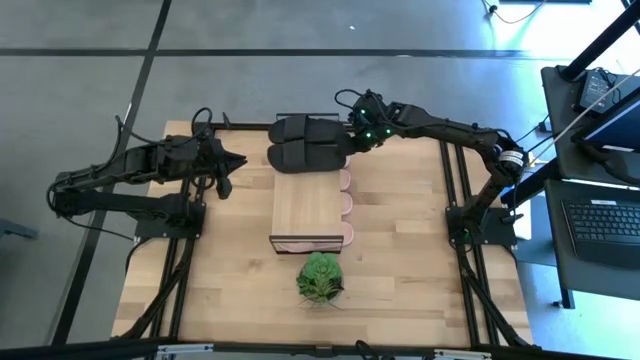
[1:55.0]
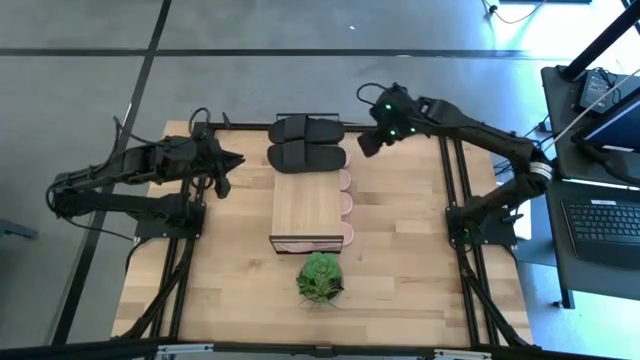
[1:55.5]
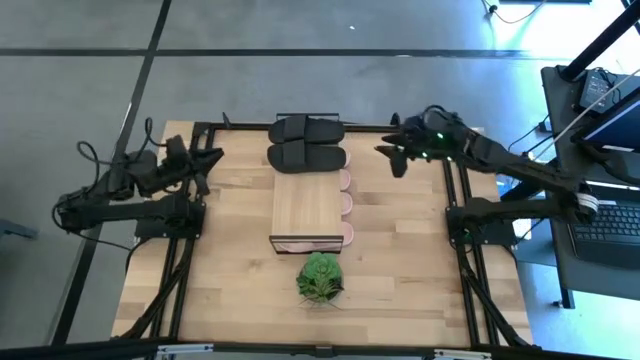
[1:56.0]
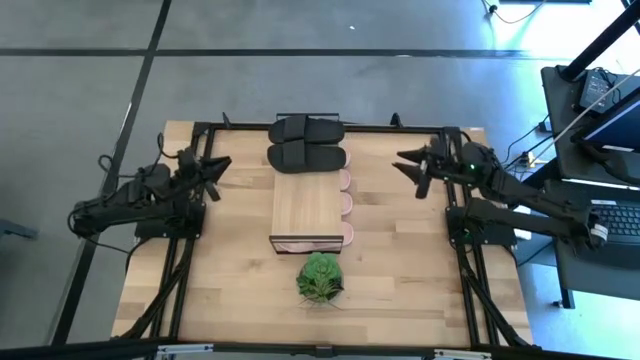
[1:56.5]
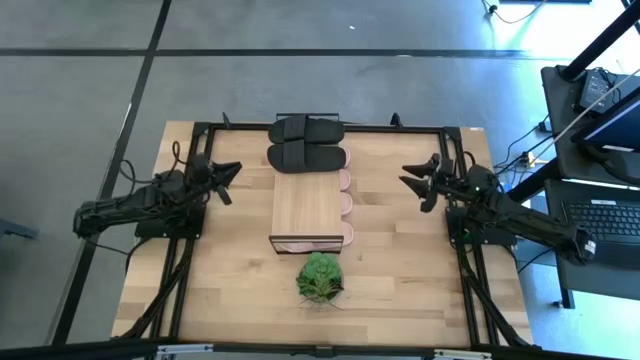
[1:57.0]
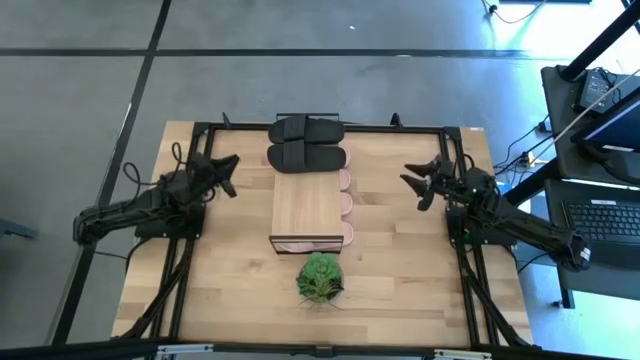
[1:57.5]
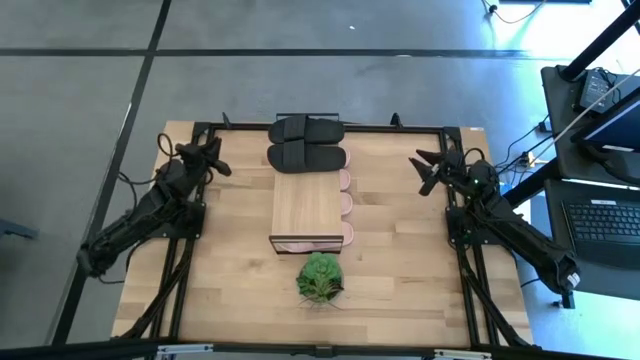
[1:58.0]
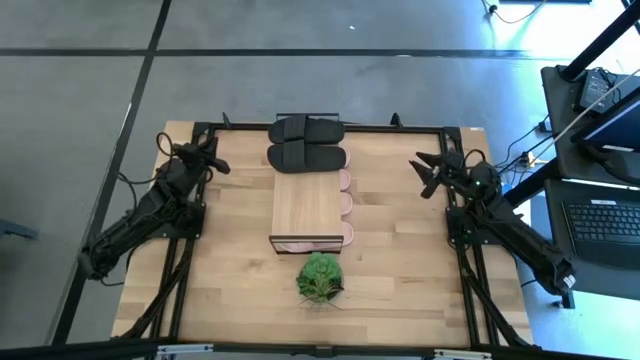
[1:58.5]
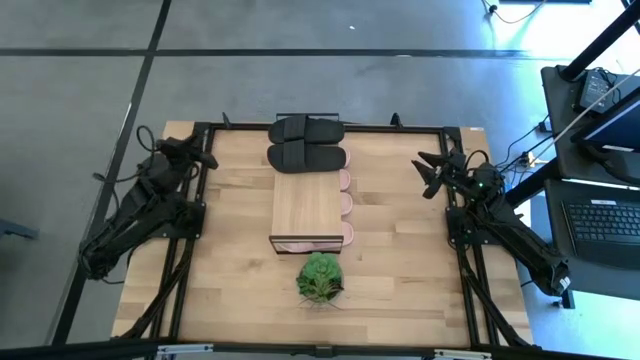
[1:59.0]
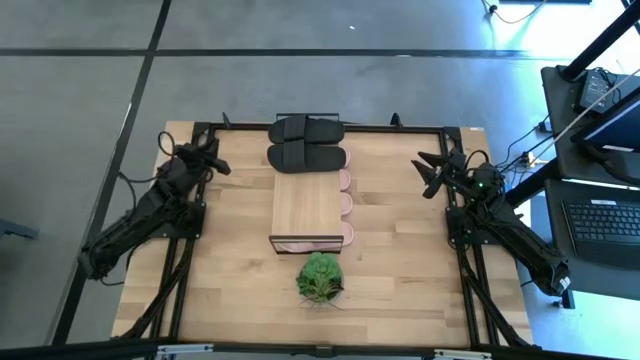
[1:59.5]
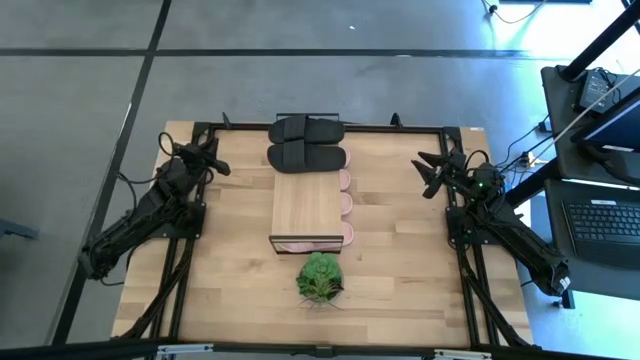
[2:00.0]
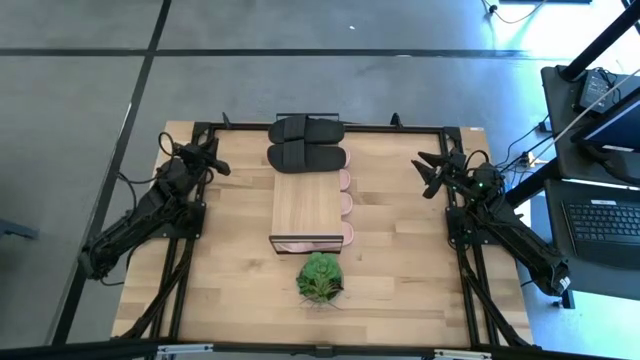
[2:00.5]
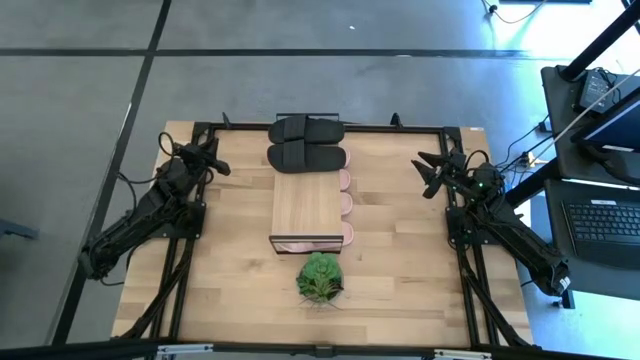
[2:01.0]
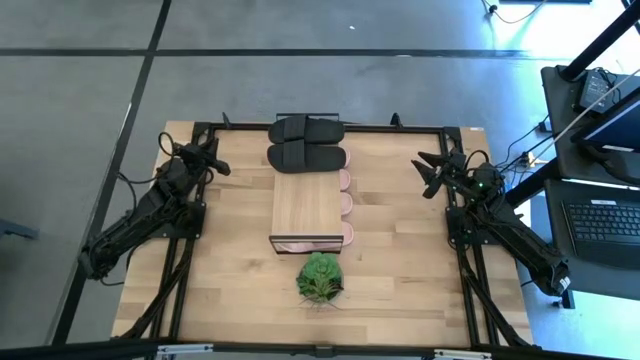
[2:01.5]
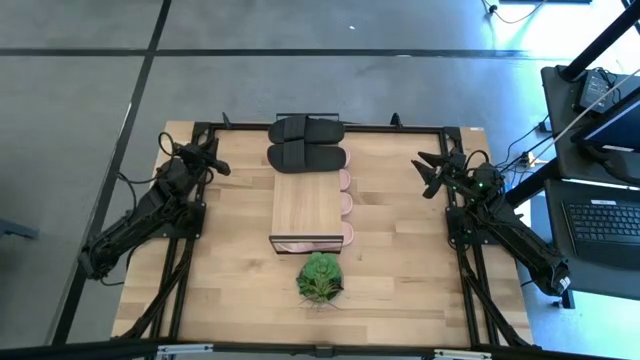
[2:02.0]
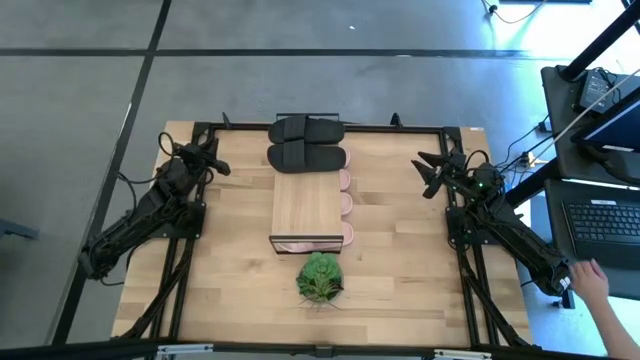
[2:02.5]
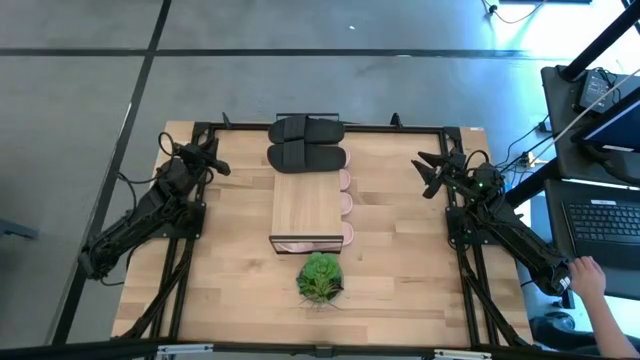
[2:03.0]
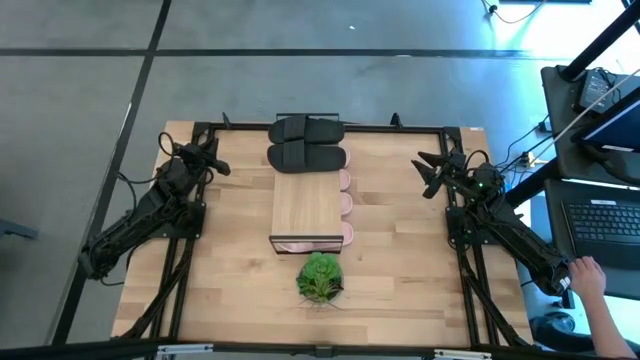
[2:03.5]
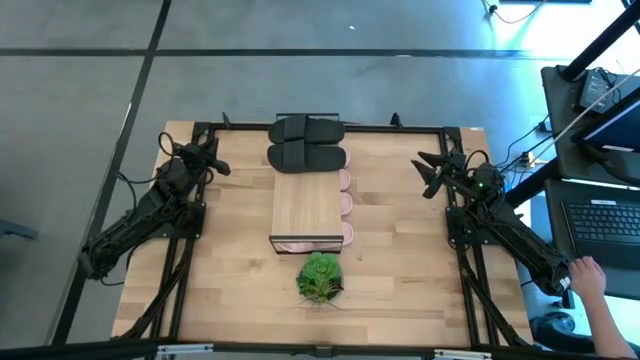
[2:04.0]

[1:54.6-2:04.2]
Task: Pick and place slides into the shelf
Return to Home Position

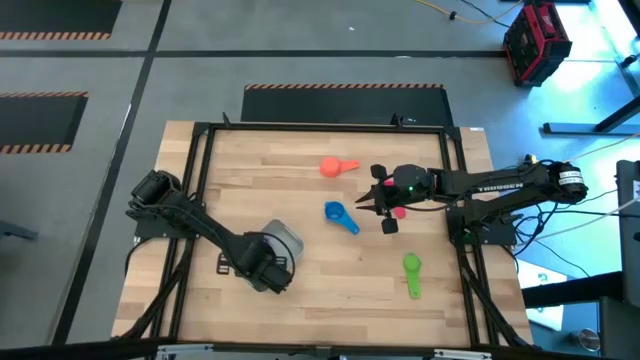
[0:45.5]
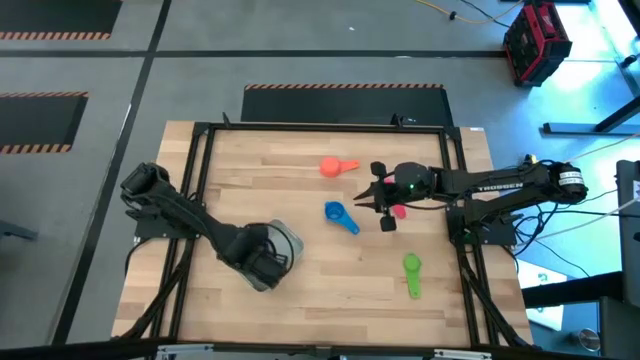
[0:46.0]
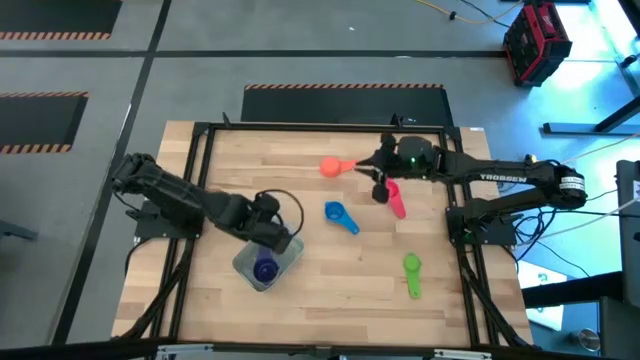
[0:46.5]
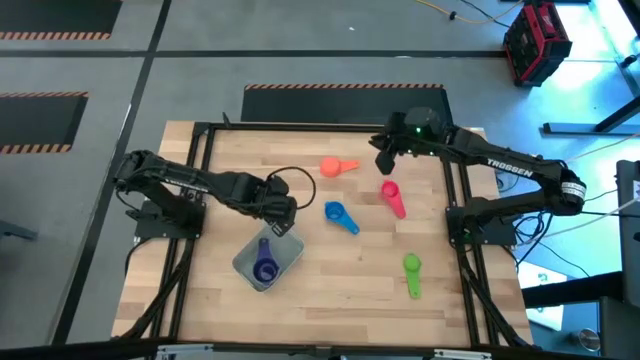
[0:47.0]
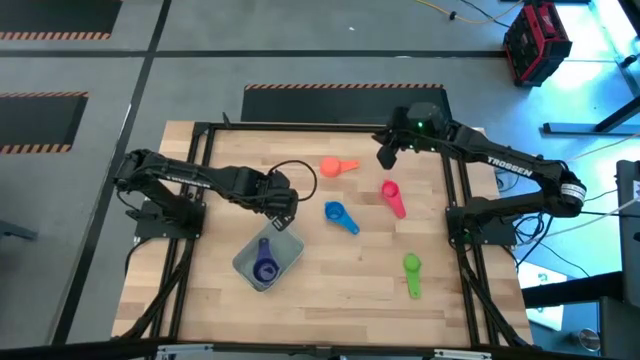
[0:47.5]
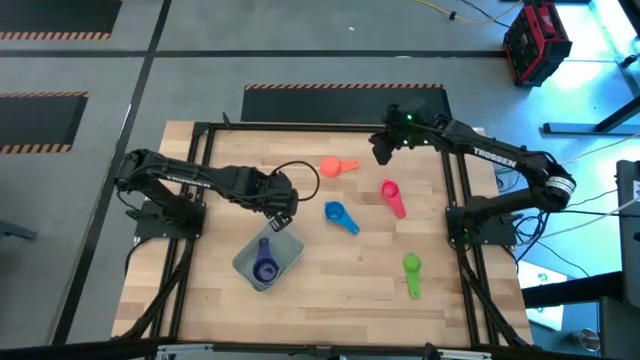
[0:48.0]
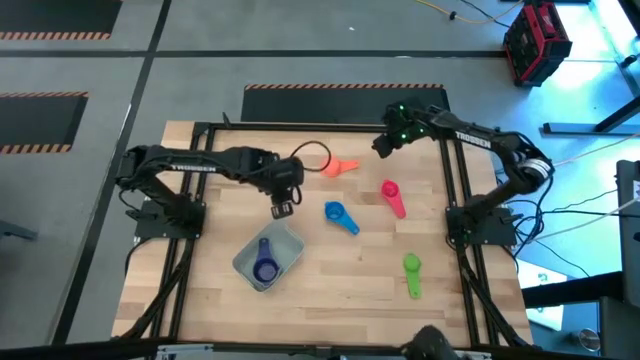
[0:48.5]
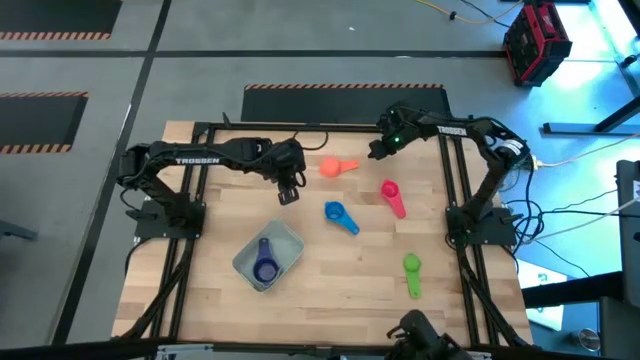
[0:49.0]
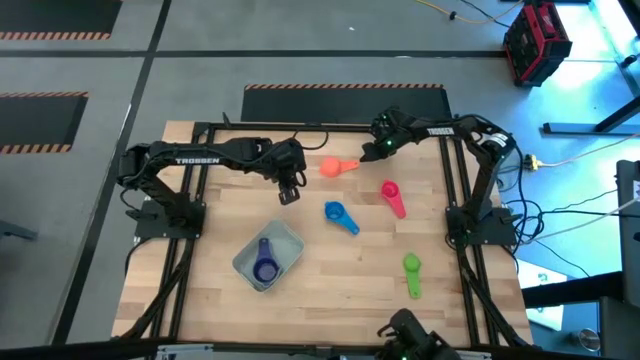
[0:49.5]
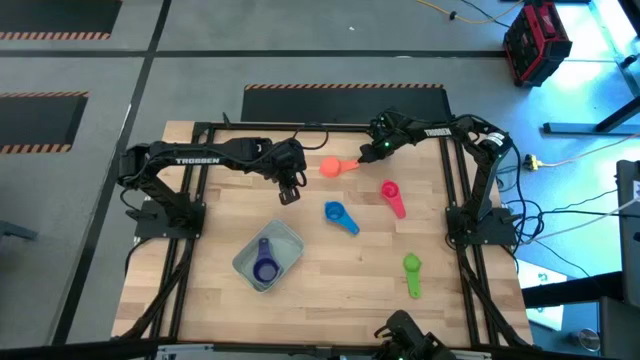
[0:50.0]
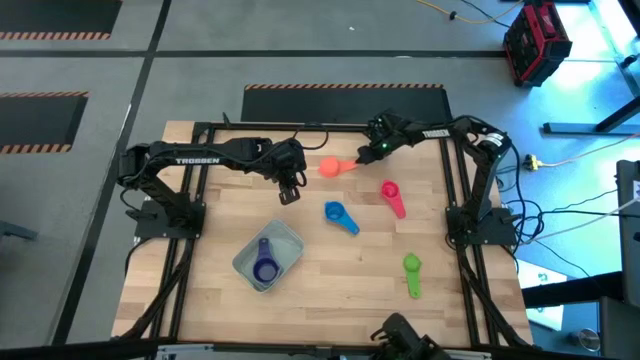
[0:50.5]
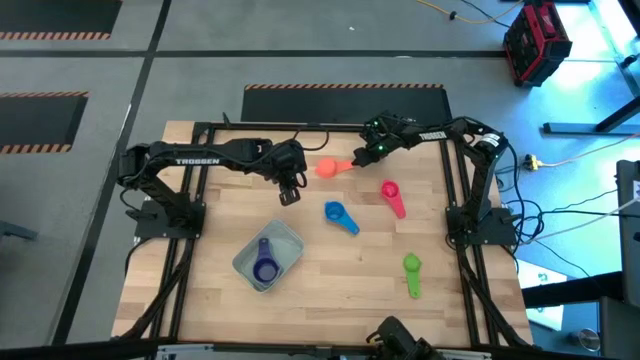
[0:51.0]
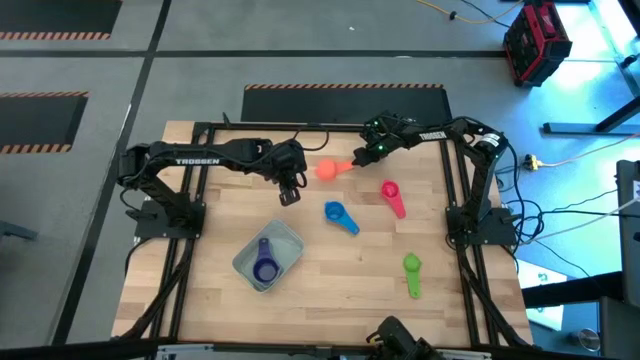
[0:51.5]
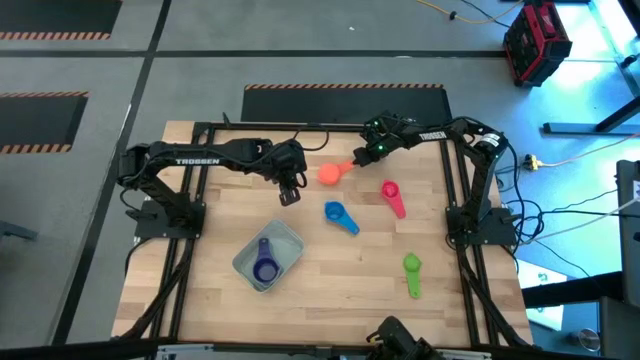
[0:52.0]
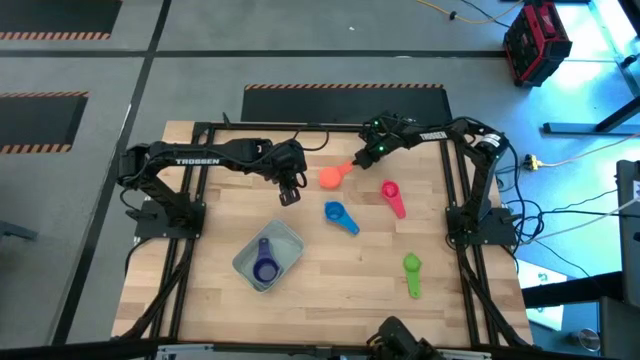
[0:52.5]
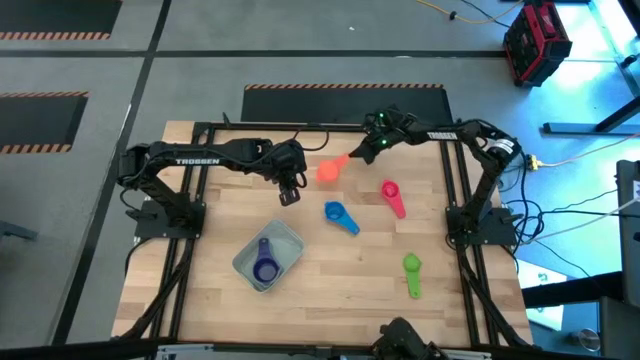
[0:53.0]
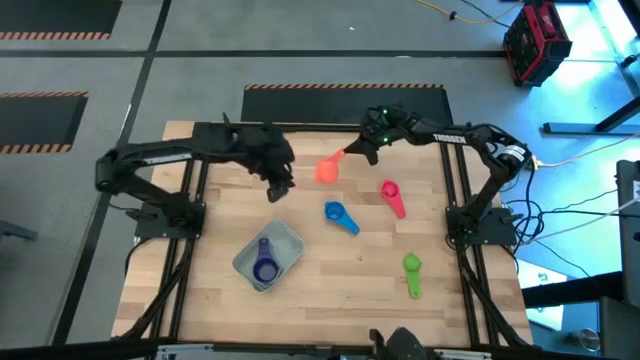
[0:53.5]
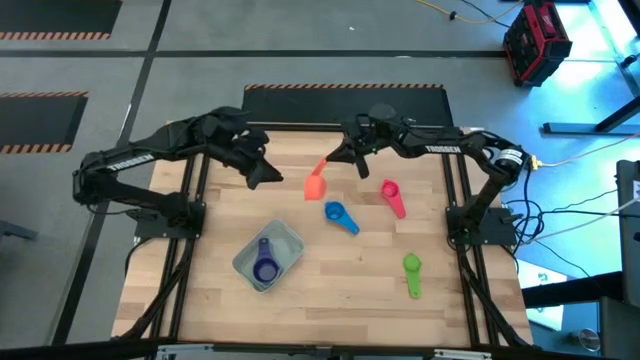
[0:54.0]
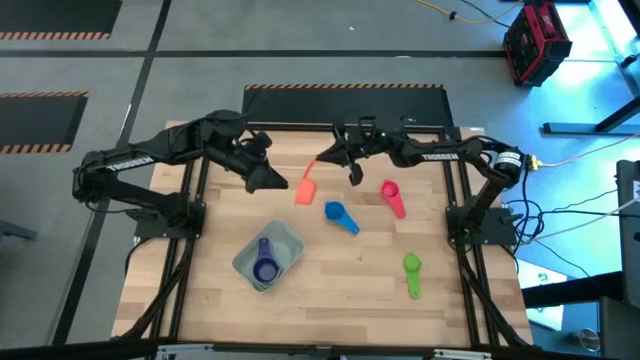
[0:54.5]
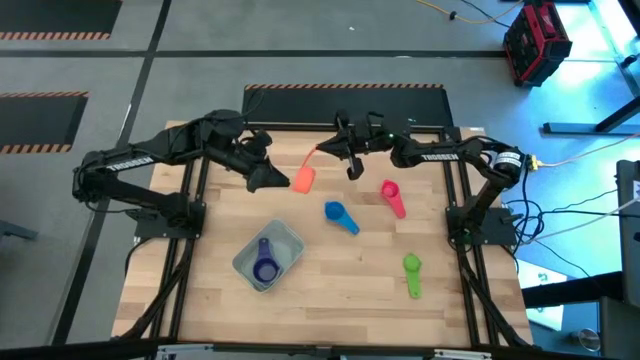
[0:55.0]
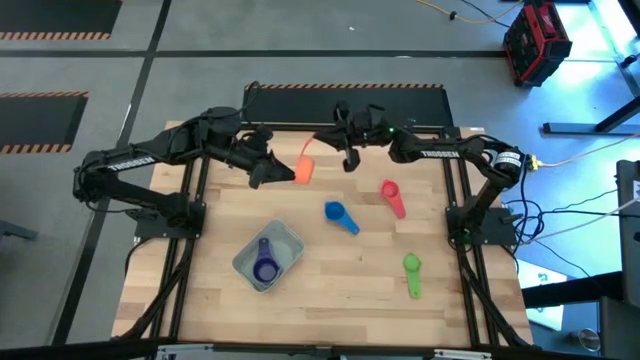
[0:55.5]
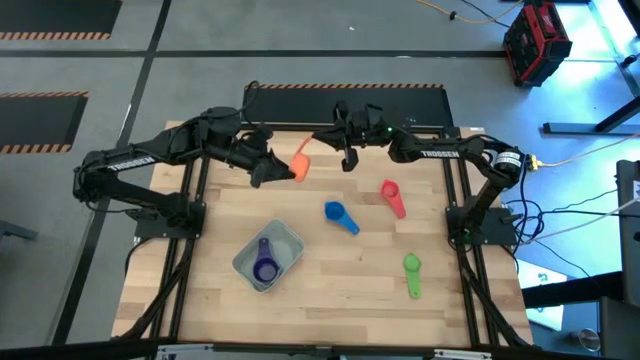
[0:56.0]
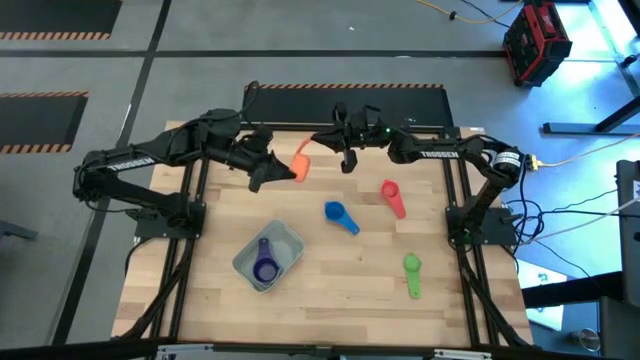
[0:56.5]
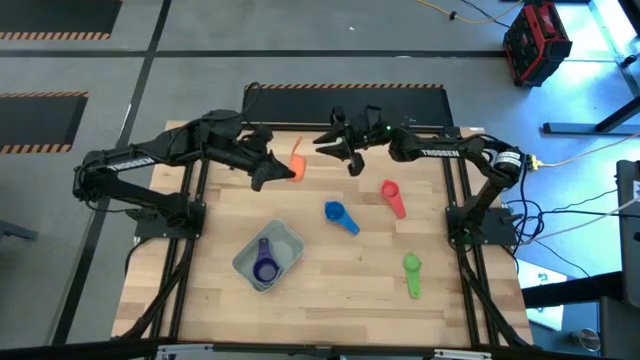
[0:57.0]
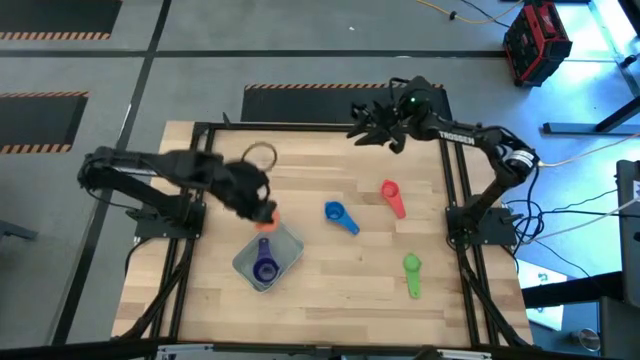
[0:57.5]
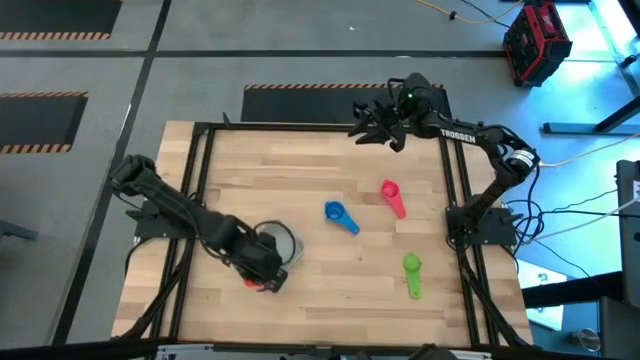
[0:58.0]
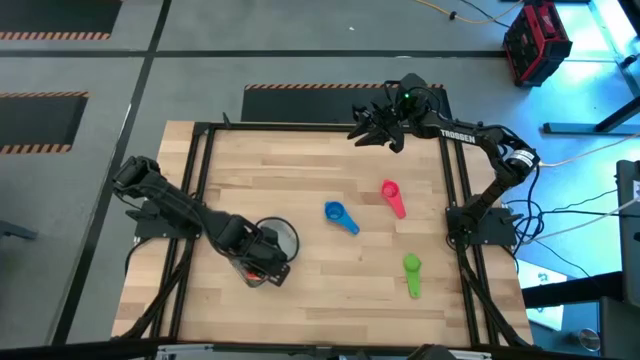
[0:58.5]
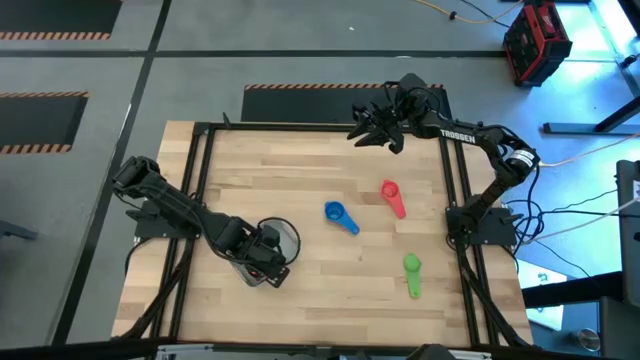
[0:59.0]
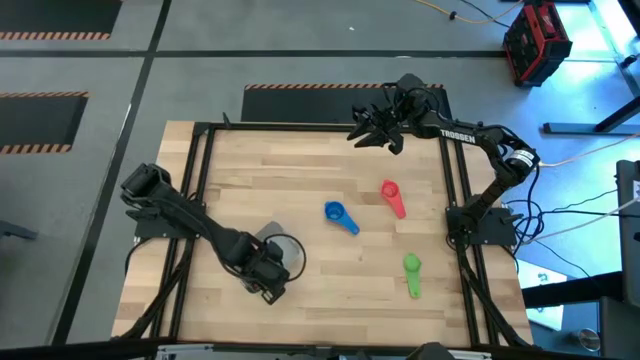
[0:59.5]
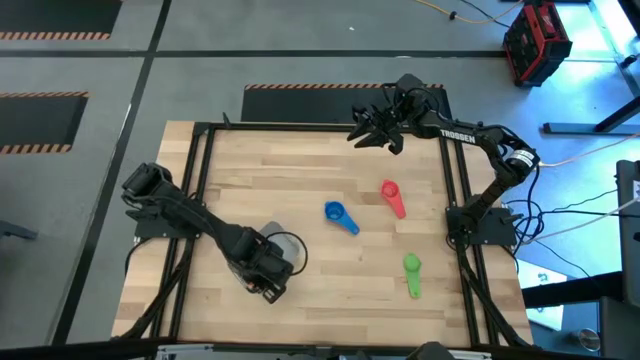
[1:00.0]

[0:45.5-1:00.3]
Task: Nest measuring cups in basket
Stack the orange measuring cup on the violet measuring cup in the gray bin
